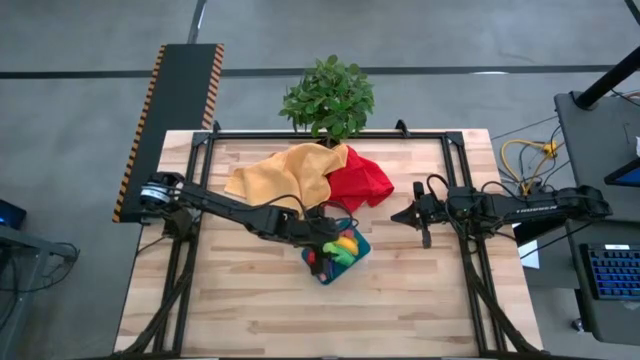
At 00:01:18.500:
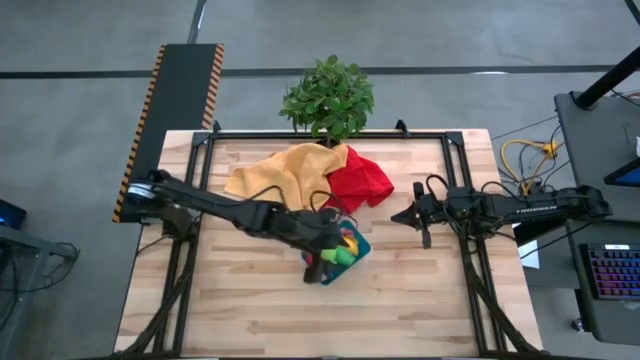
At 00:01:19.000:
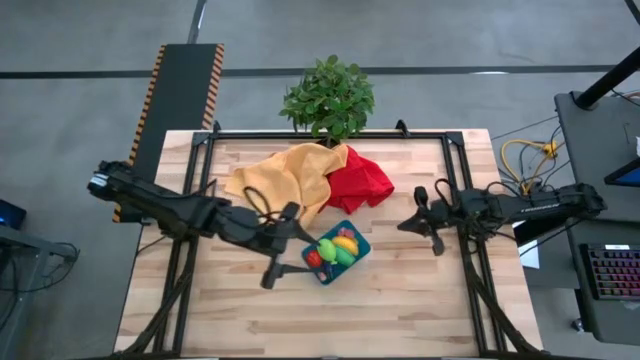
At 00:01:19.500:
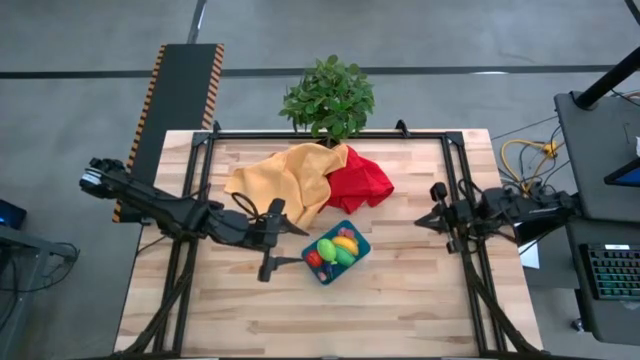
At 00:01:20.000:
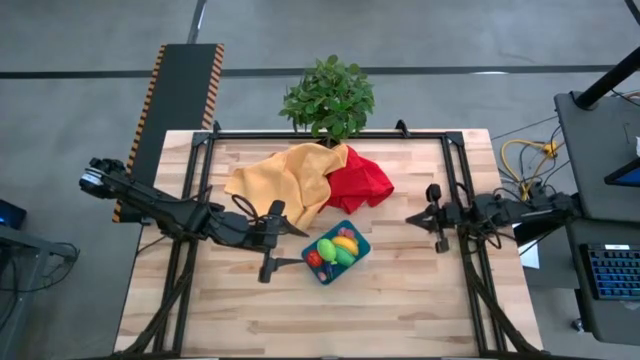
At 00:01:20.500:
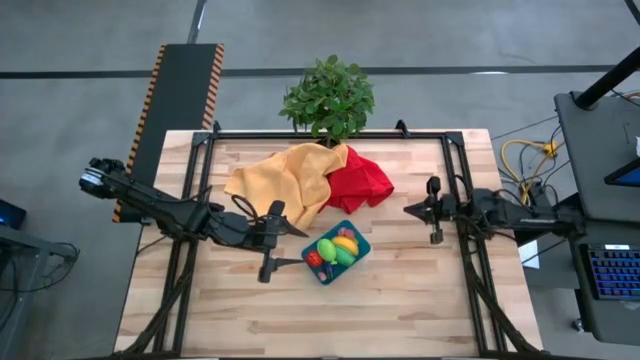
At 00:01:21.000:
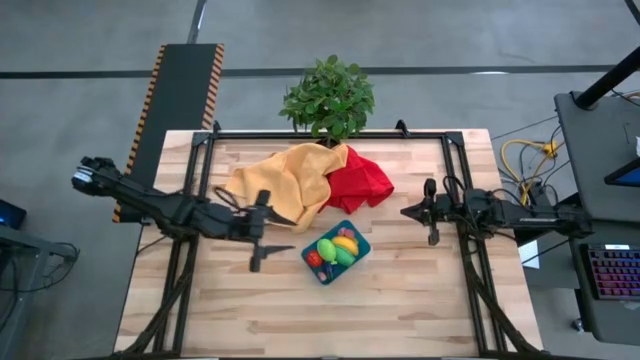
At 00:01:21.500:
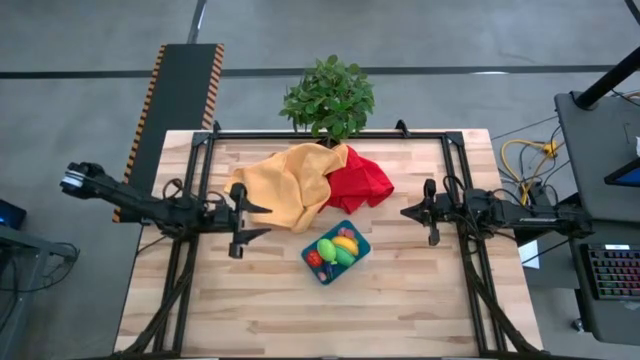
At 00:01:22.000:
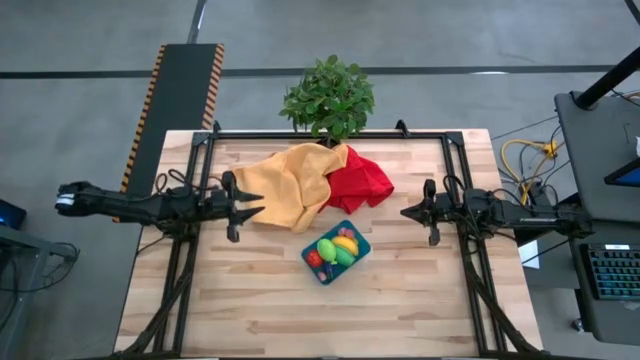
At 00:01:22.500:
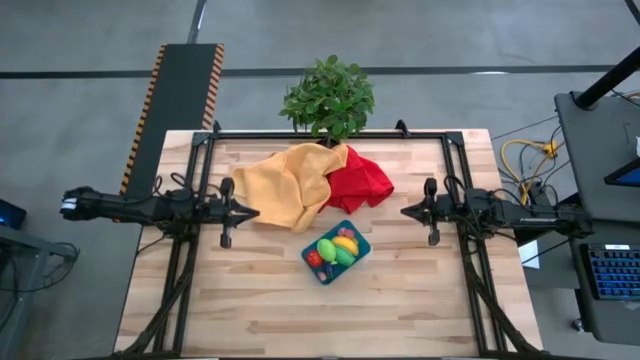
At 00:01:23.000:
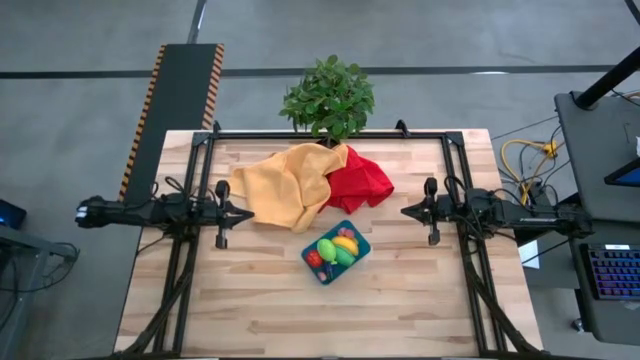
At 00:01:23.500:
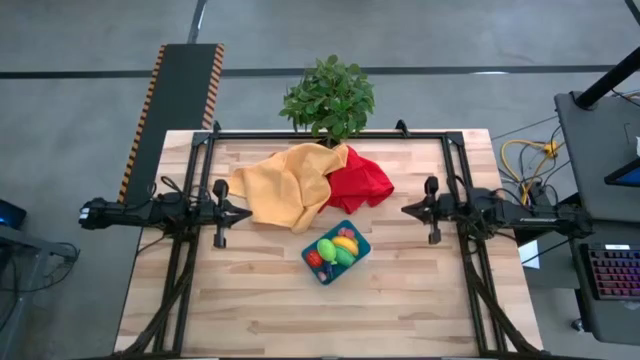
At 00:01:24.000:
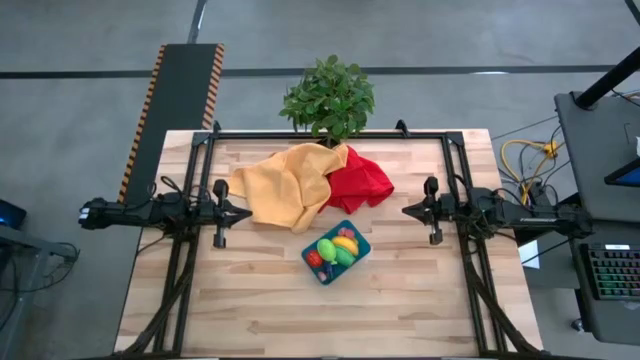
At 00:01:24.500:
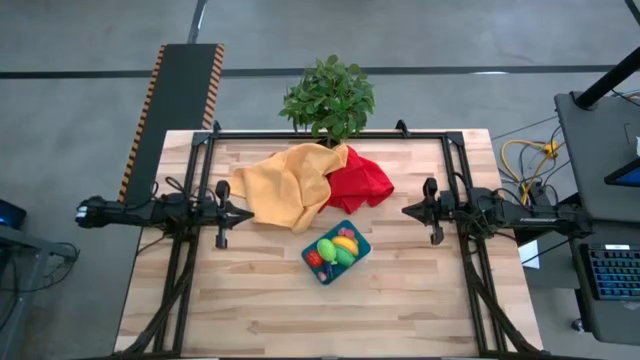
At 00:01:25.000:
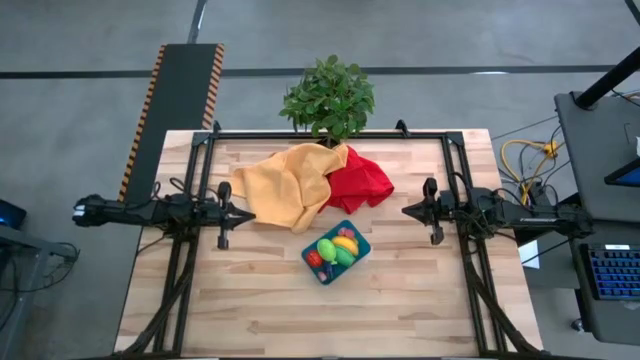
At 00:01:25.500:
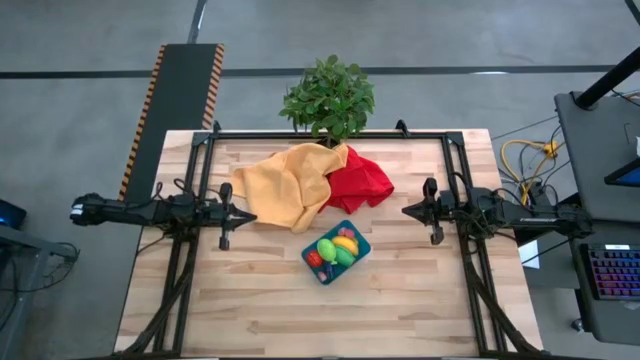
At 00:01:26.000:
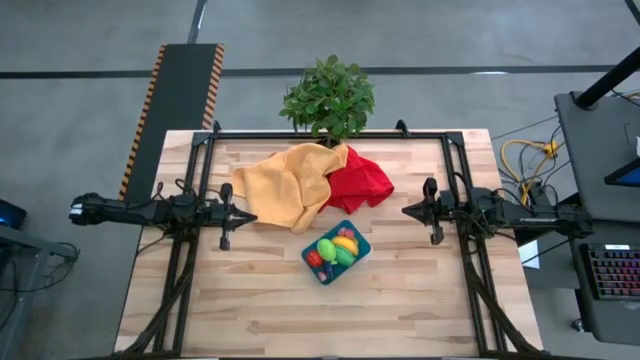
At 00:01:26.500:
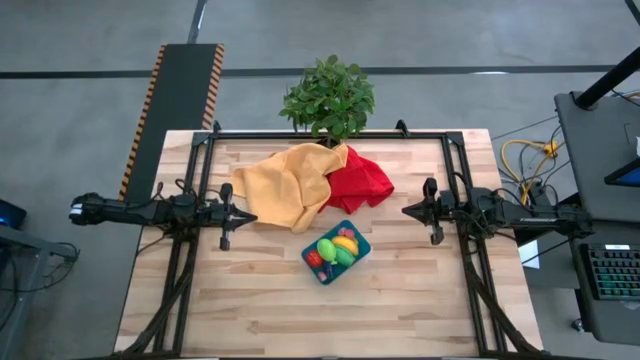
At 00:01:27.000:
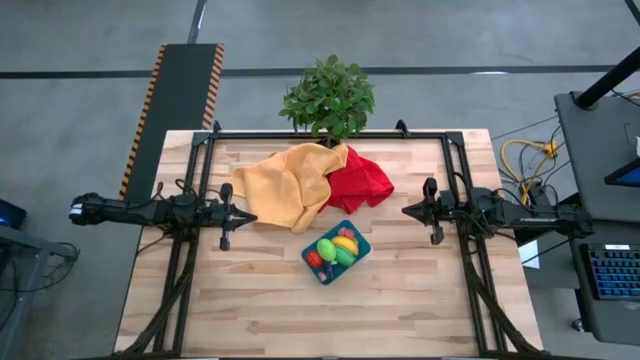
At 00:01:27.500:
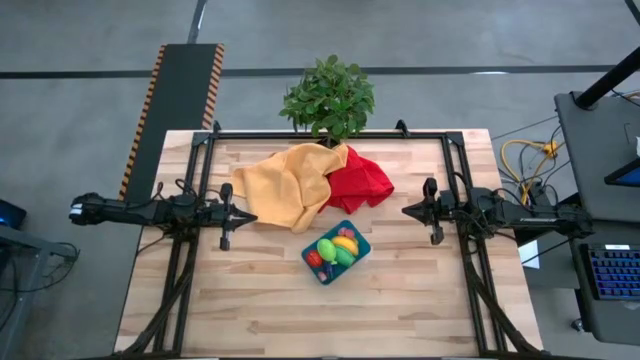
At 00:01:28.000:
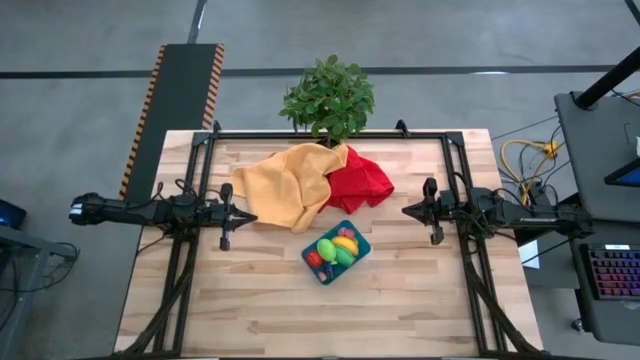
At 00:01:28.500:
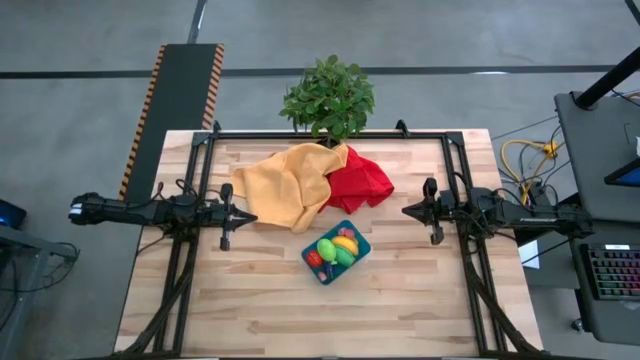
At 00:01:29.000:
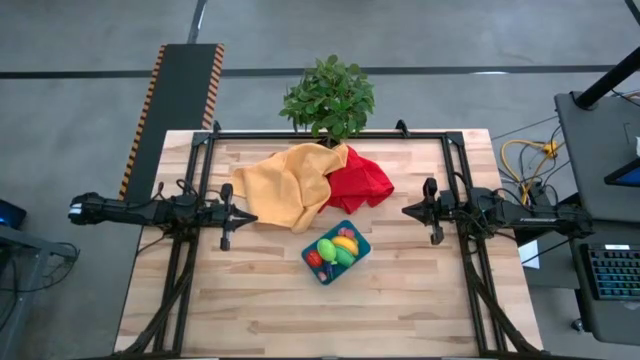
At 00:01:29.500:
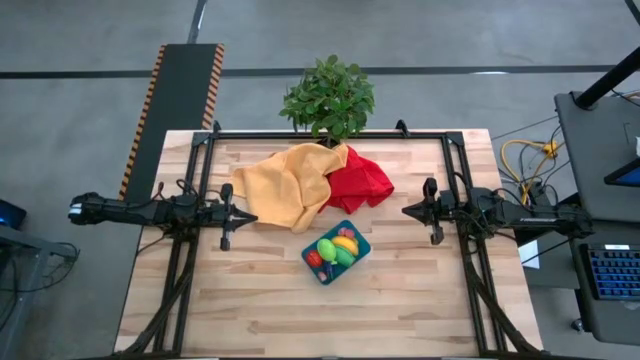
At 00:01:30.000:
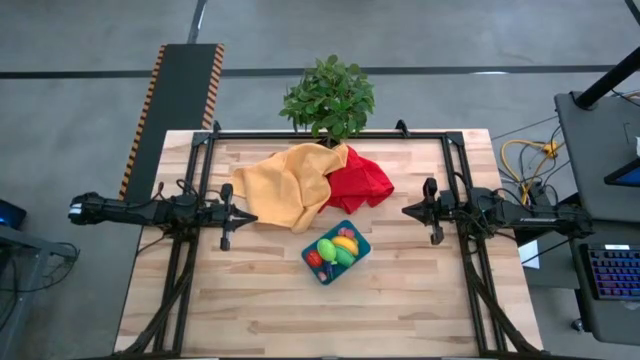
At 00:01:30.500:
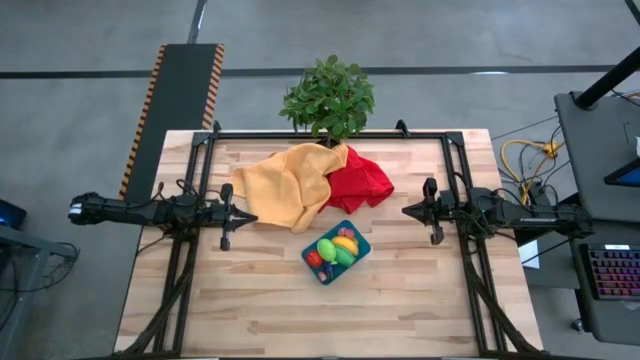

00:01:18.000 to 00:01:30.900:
Task: Pick and placing Produce into tupperware
Return to Home Position

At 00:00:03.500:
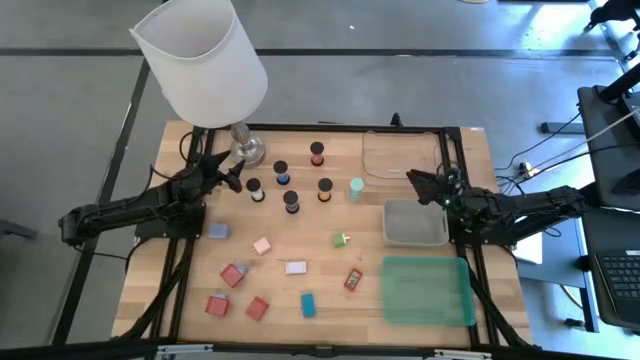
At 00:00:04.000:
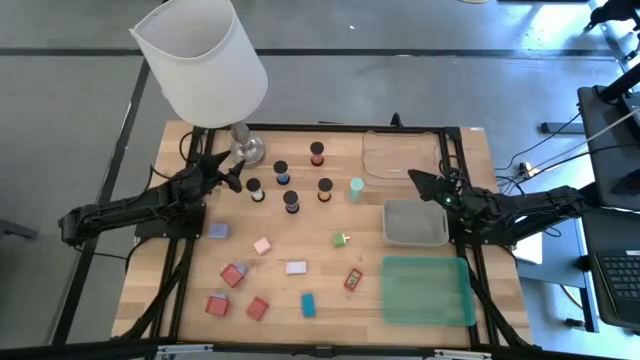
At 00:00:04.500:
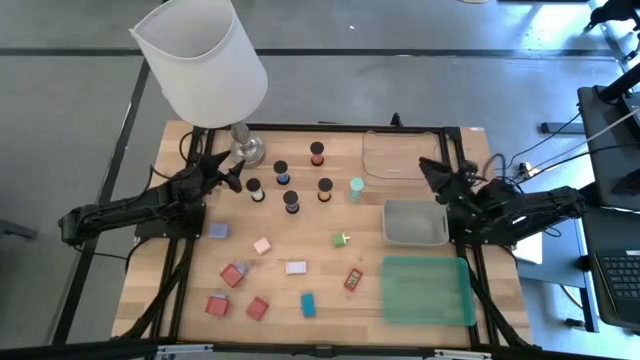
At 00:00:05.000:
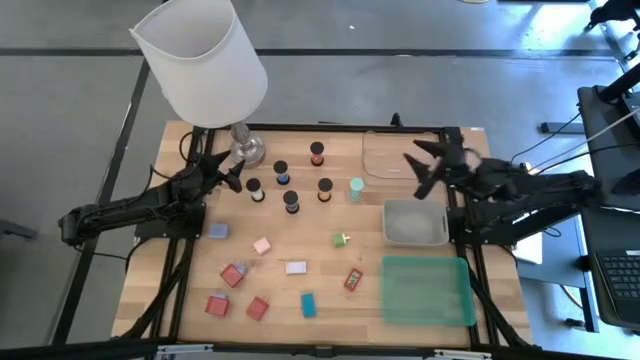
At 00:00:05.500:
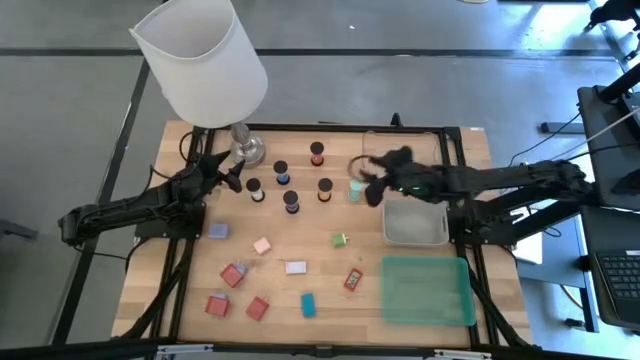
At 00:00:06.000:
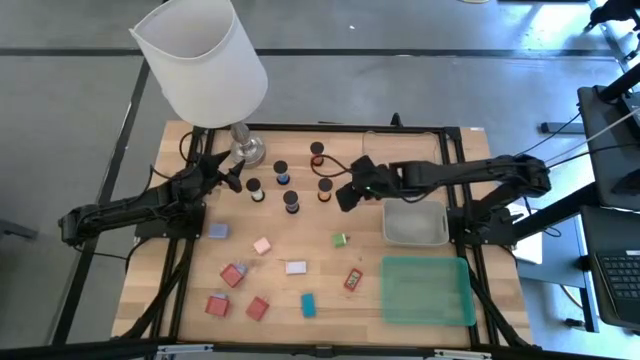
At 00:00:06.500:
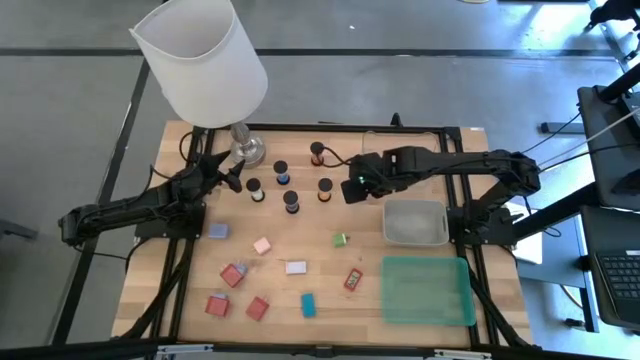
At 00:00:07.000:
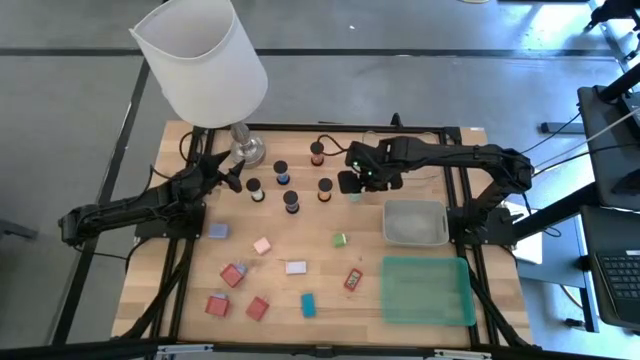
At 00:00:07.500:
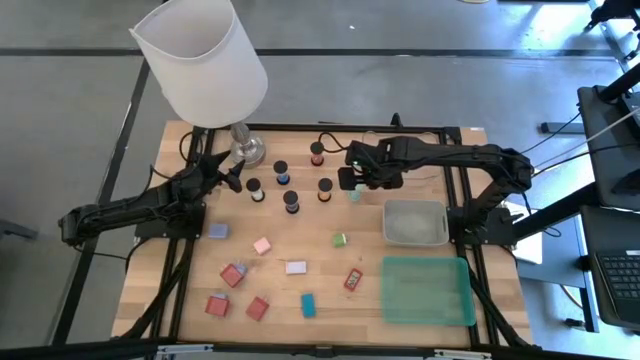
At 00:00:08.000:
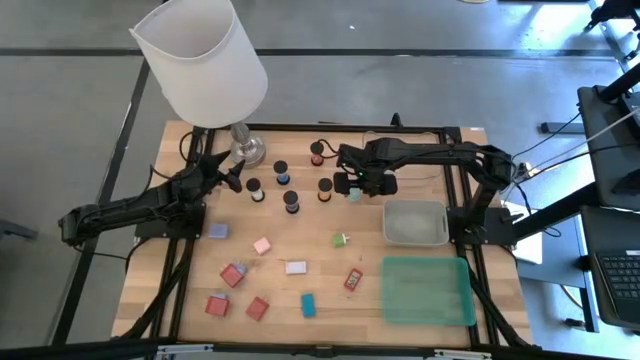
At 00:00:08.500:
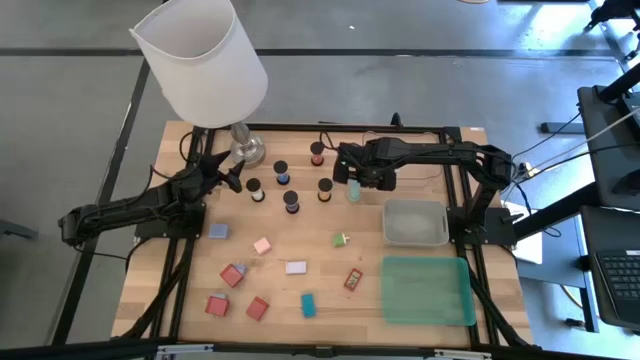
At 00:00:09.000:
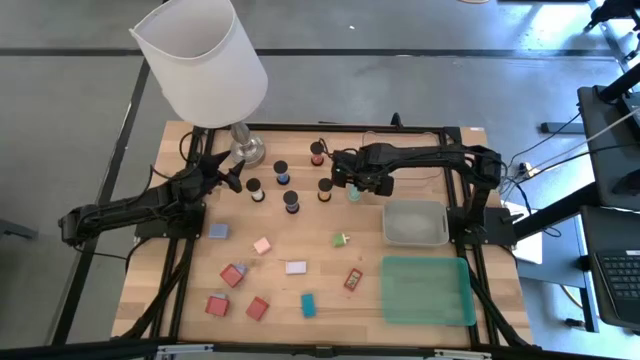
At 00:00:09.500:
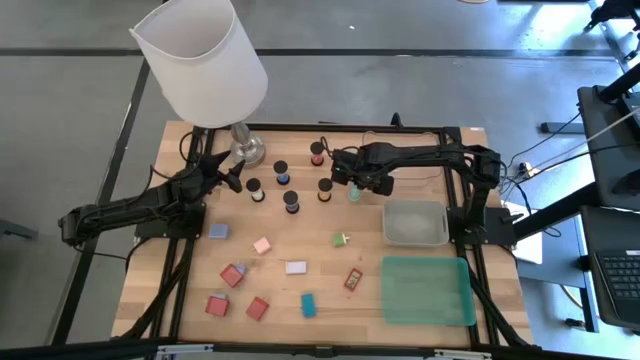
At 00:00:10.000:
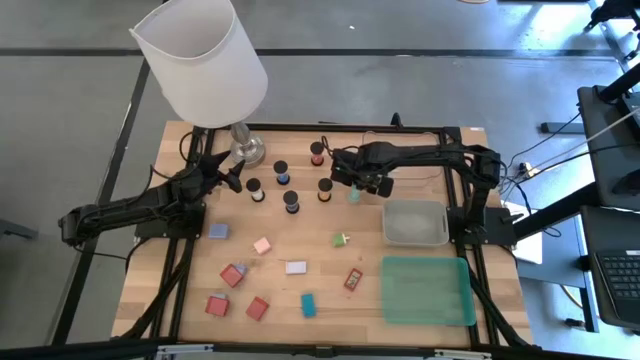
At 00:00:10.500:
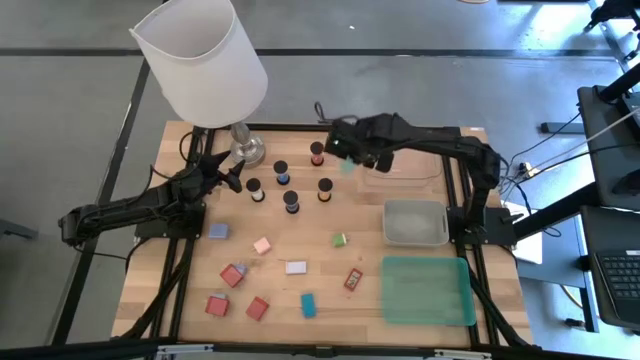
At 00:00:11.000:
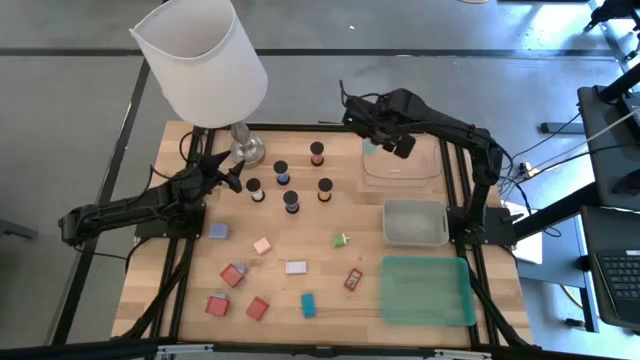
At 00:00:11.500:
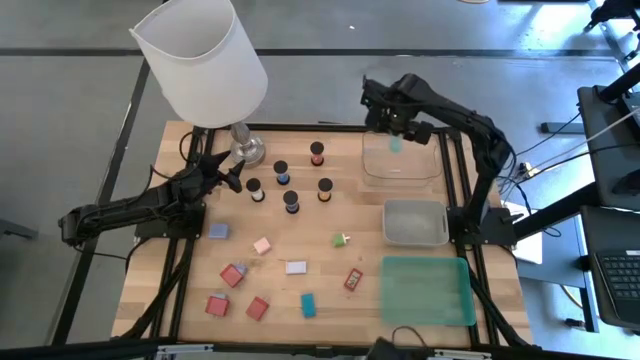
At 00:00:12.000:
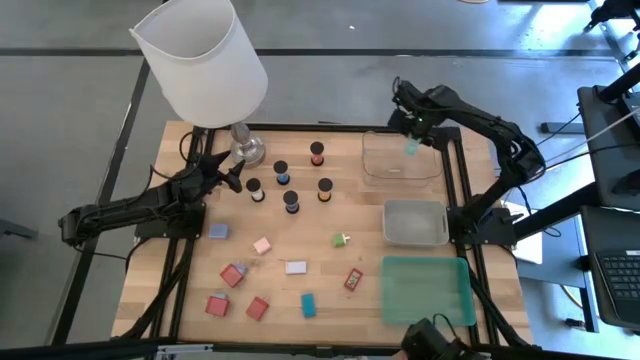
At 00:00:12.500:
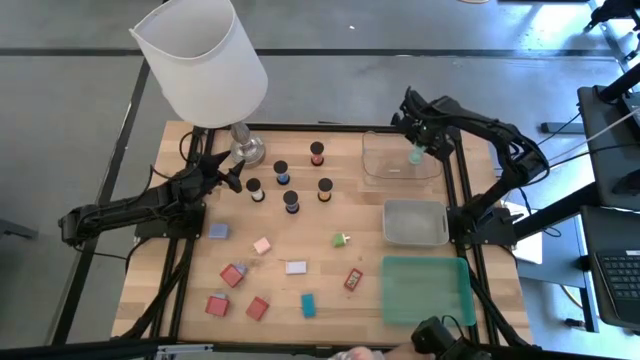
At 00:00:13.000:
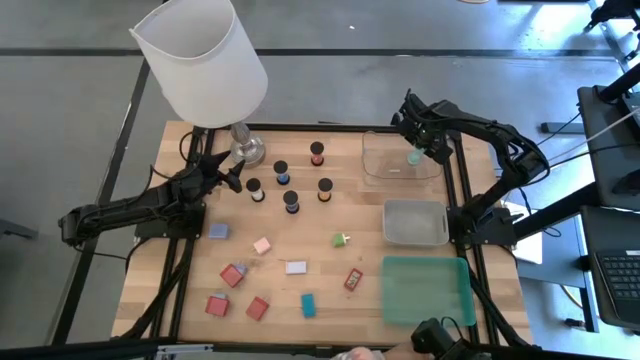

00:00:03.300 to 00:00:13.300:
Task: Pick & Place Office items
Put the light blue hourglass into the transparent bin
